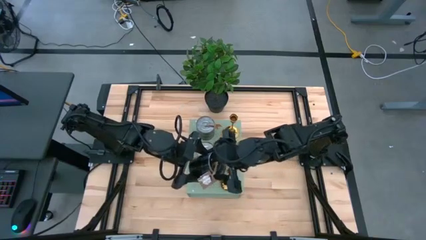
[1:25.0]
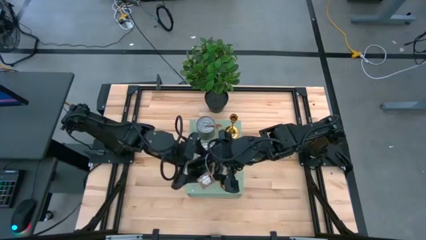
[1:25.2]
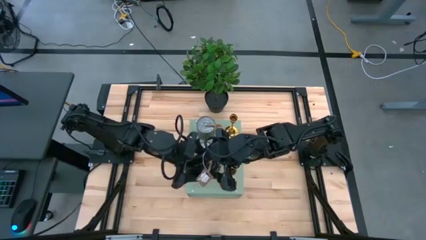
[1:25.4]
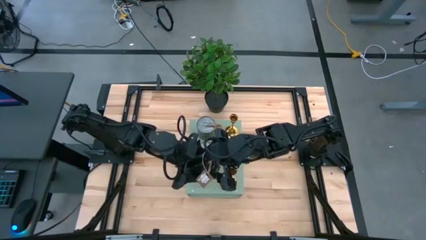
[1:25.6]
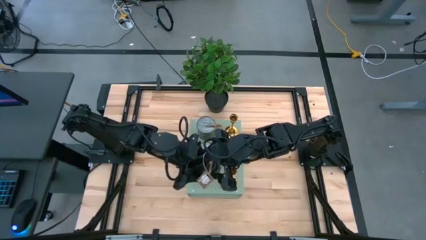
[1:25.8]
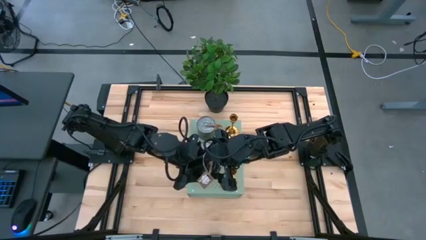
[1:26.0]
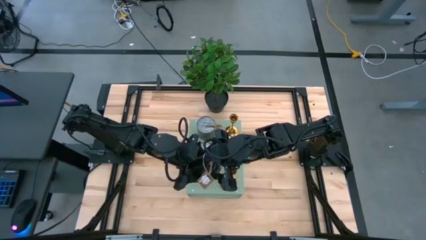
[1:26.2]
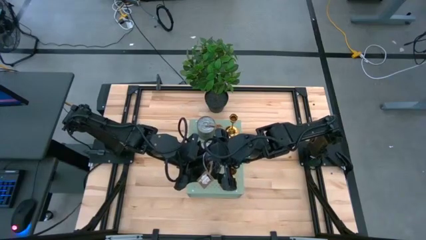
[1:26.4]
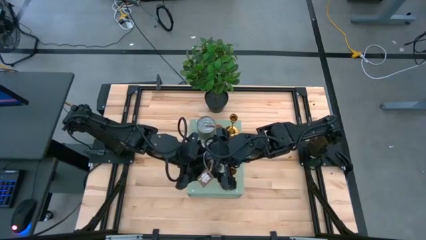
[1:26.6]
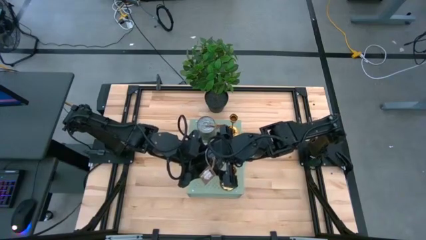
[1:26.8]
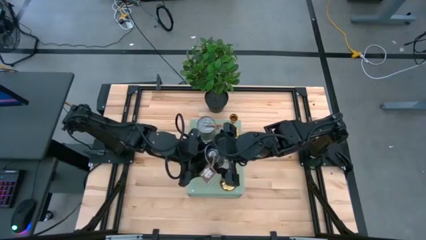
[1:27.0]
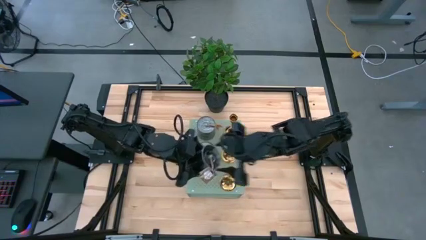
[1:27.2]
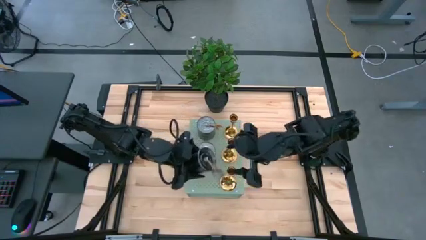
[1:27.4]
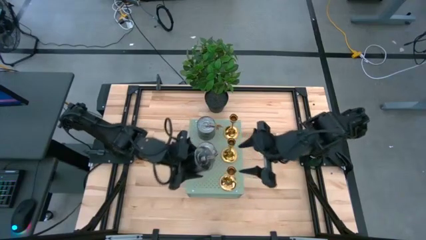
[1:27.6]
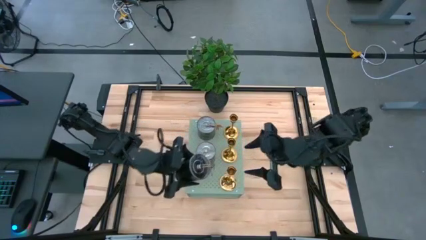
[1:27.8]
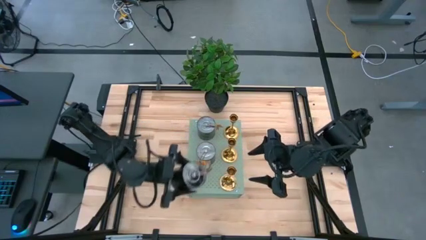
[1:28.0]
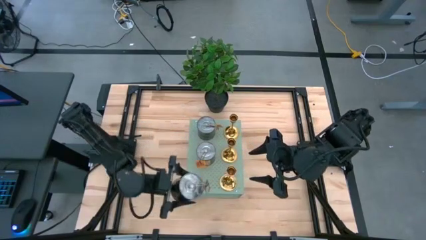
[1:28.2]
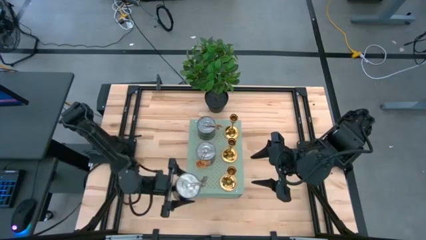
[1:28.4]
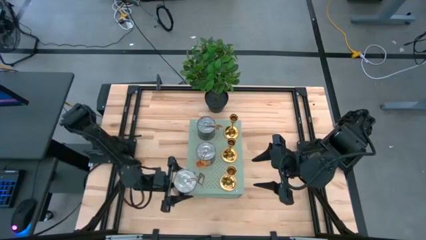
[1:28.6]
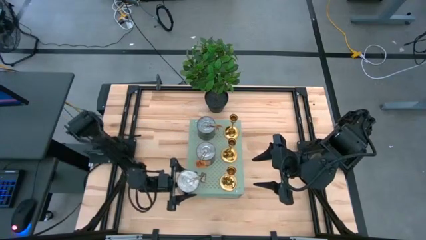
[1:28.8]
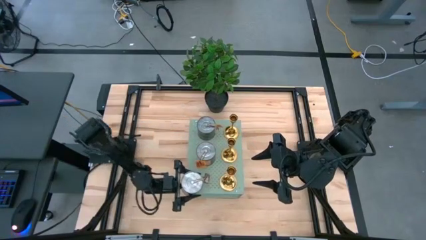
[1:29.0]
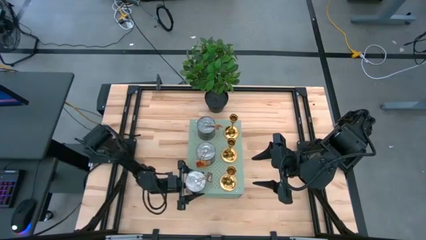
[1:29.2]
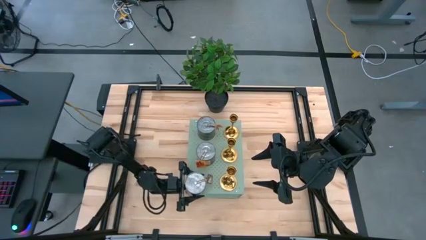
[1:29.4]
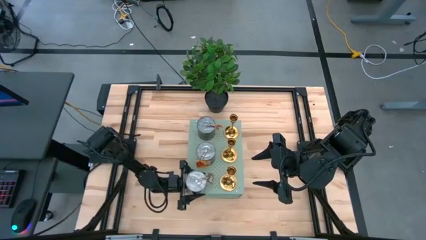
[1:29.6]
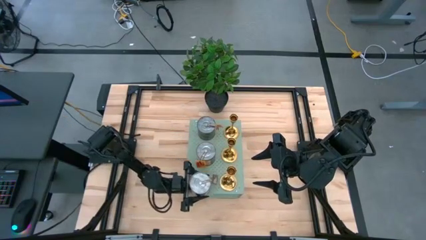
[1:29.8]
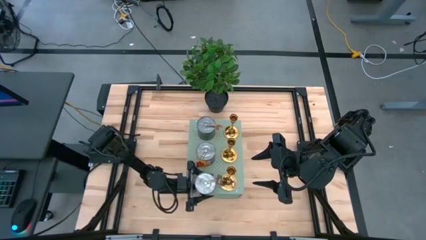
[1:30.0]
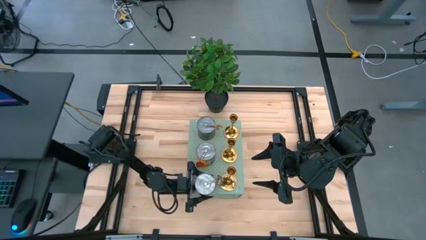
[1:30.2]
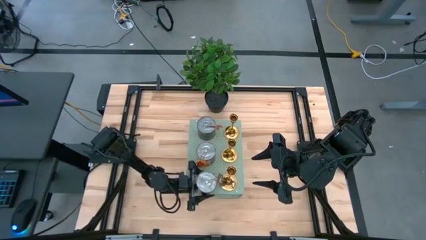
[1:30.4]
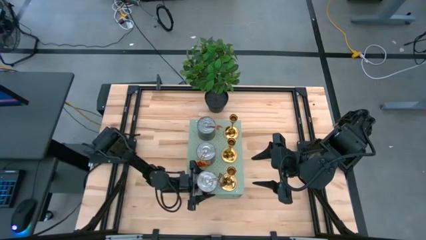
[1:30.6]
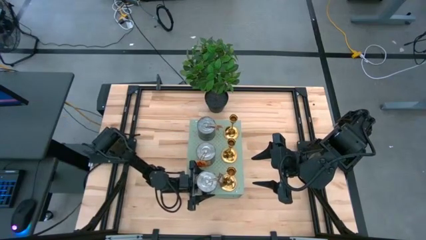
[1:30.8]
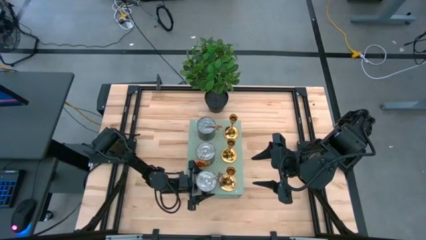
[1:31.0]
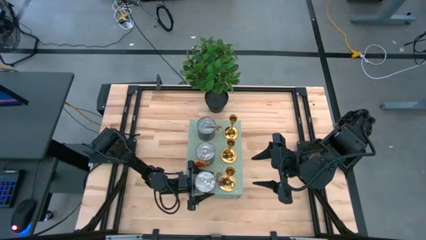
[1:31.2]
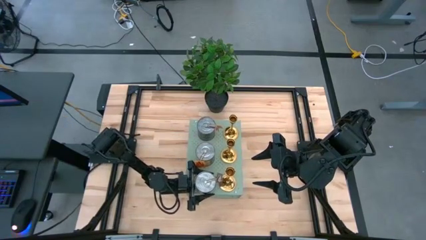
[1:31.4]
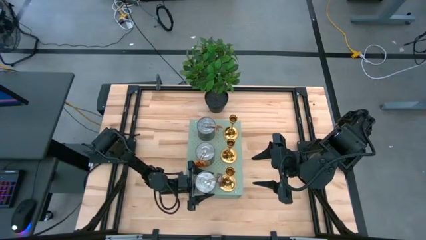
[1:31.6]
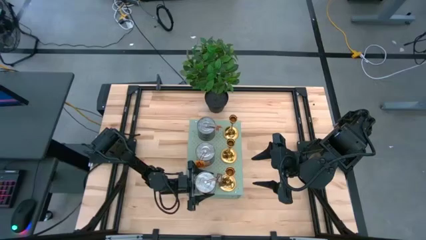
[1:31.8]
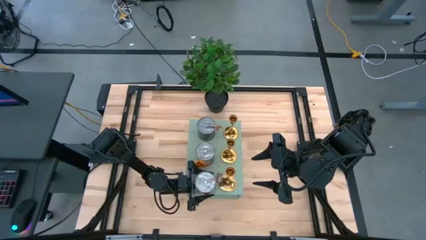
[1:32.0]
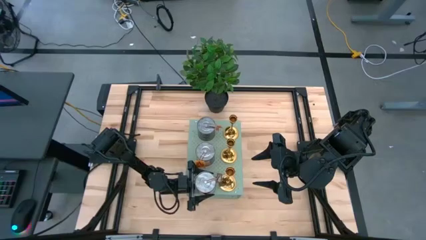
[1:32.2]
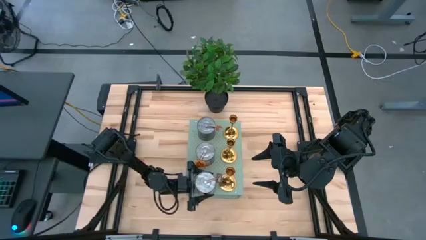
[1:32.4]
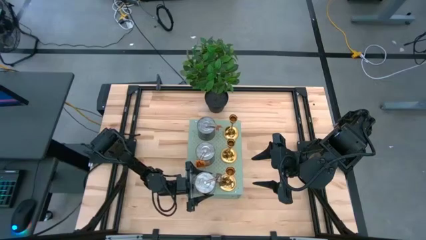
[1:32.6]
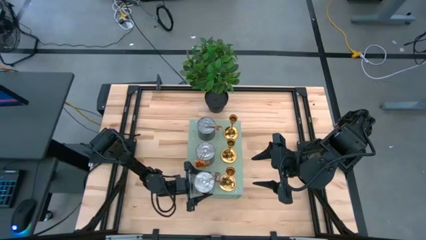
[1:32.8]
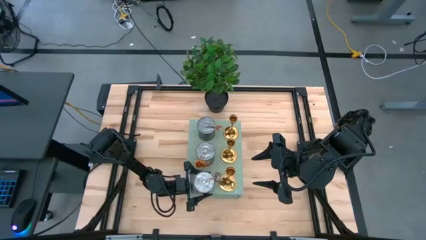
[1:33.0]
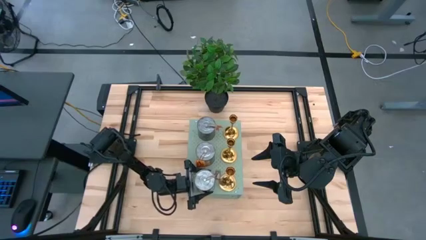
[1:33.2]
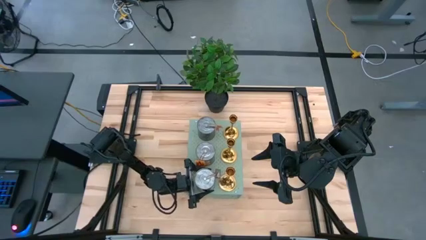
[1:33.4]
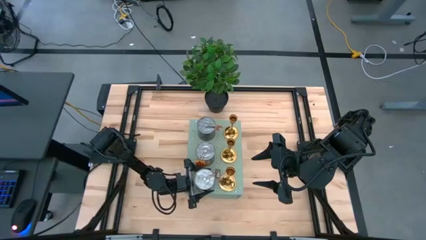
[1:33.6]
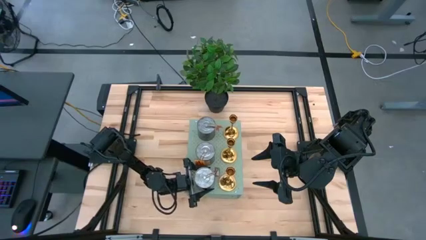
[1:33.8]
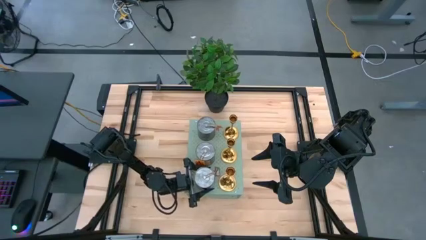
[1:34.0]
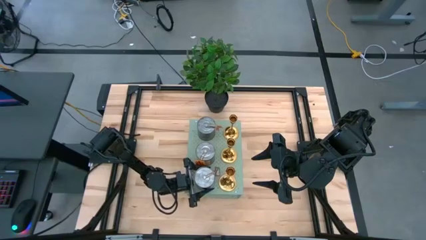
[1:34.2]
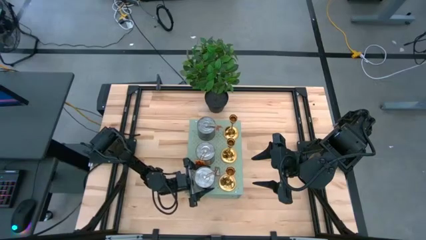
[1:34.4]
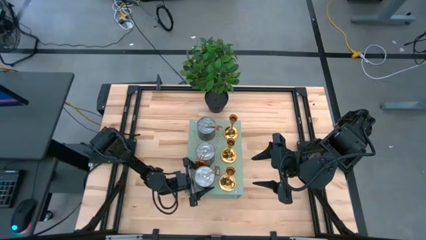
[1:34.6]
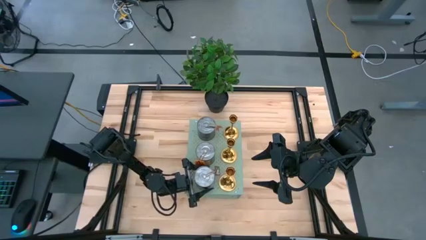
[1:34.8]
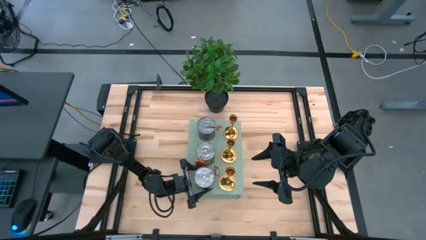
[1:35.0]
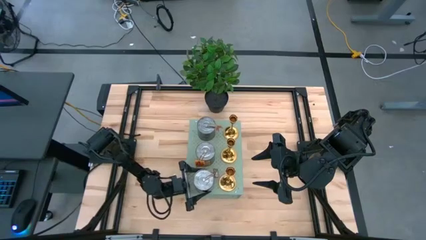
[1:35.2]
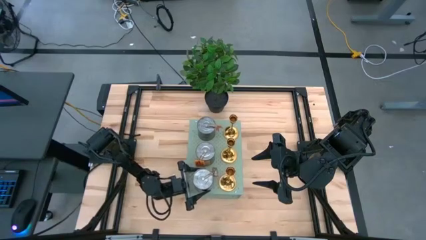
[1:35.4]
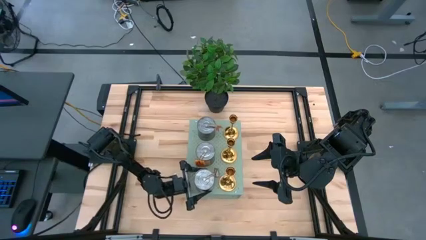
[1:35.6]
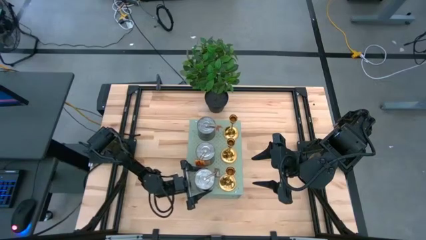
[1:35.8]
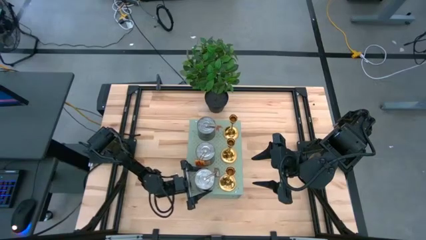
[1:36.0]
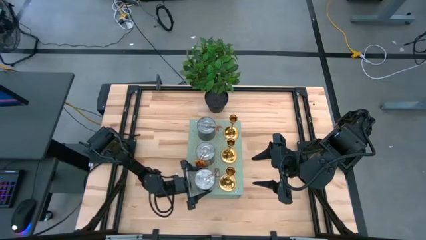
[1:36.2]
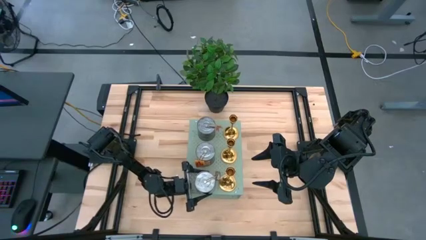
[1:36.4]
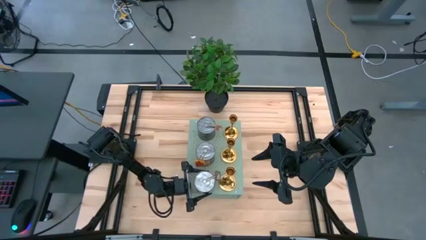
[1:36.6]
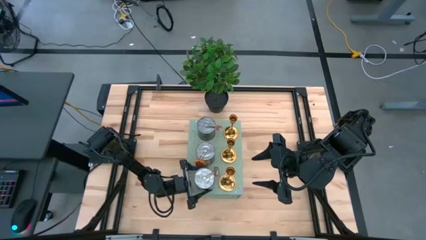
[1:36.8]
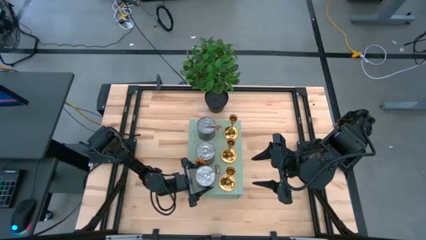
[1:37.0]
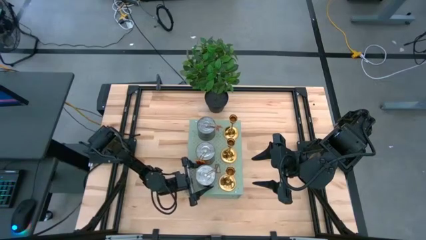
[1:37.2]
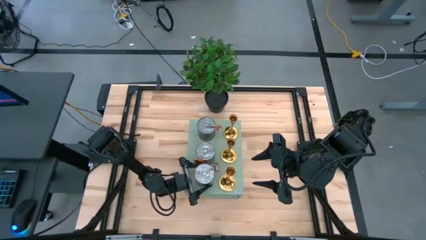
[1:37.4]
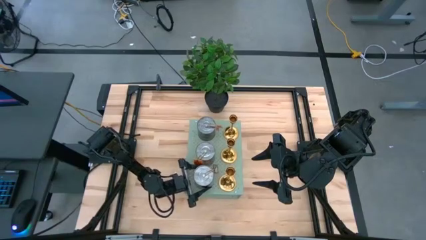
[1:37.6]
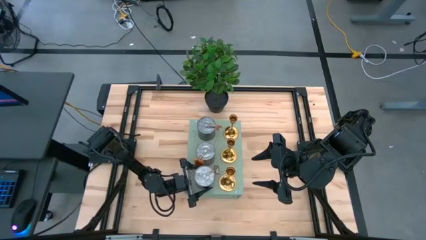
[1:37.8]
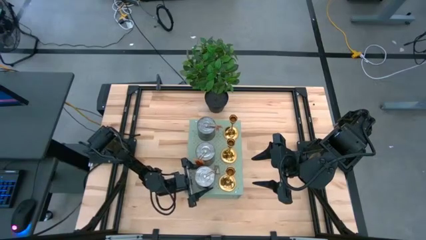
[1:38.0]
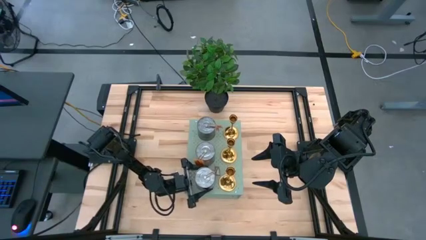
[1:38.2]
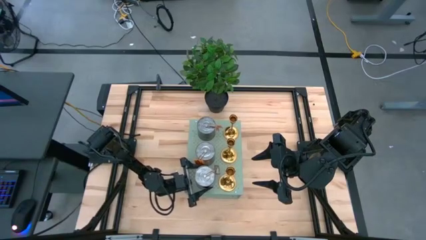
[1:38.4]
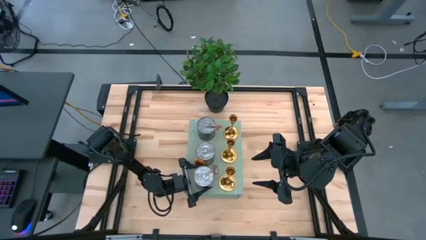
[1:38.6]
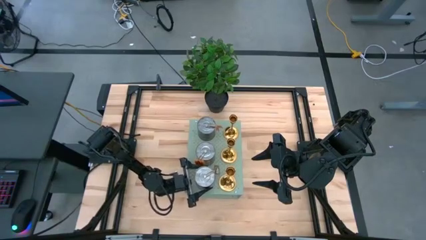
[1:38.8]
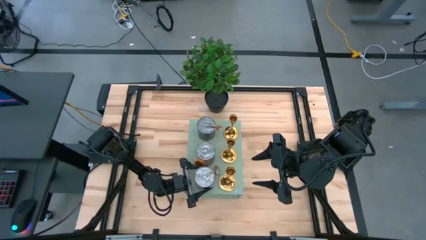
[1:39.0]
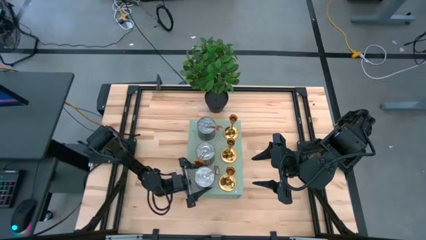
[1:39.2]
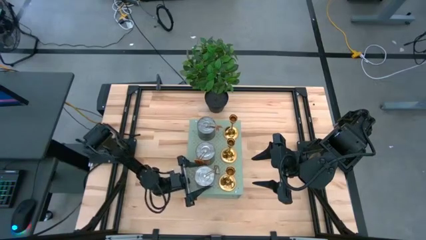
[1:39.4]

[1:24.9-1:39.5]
Task: Pick & Place candle stick holders
Align the brown scented candle with the other orange scented candle on the shelf
